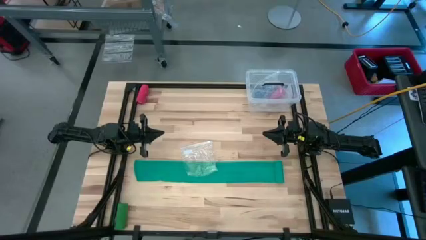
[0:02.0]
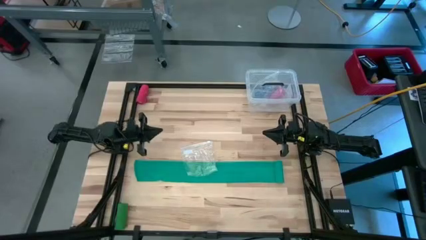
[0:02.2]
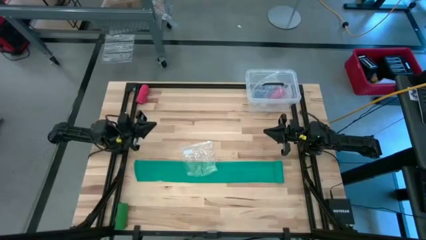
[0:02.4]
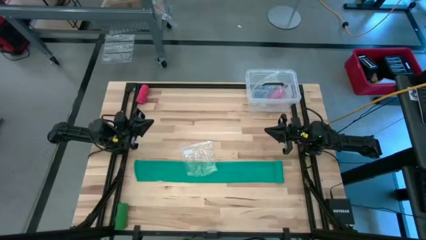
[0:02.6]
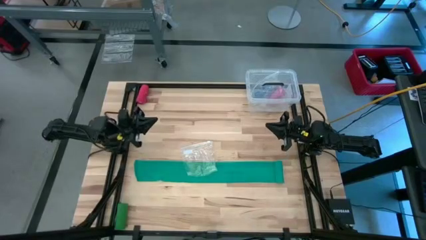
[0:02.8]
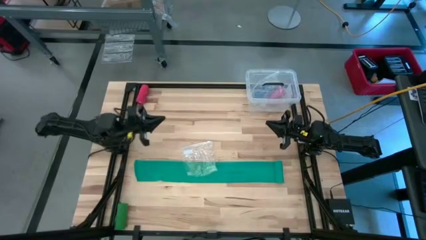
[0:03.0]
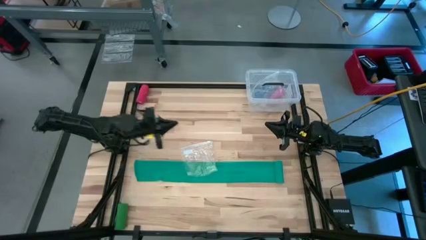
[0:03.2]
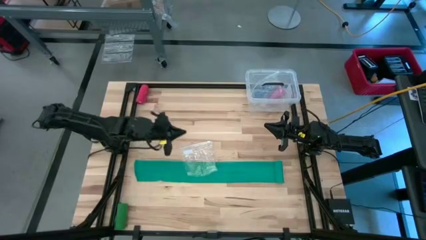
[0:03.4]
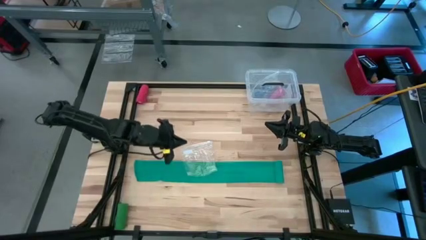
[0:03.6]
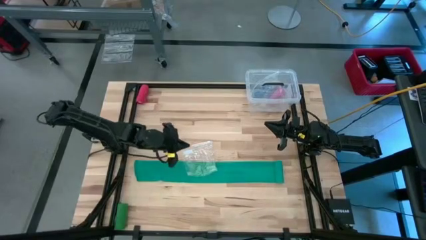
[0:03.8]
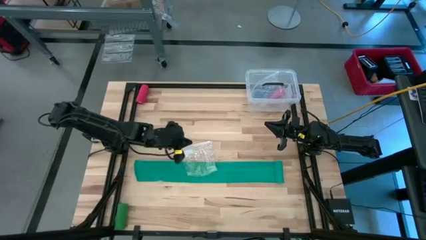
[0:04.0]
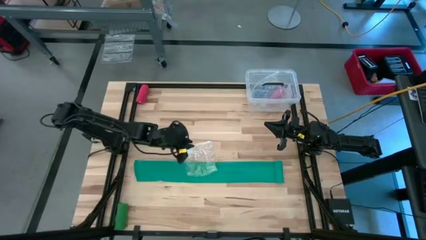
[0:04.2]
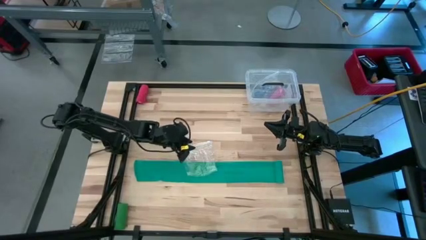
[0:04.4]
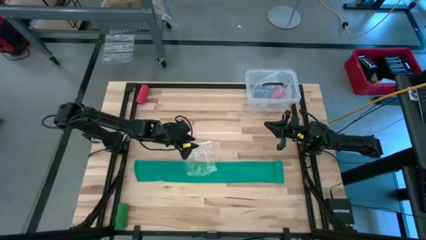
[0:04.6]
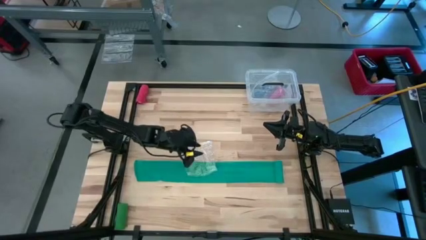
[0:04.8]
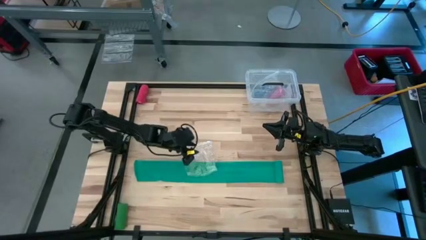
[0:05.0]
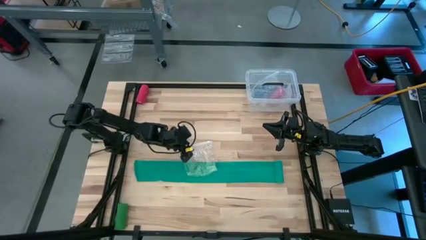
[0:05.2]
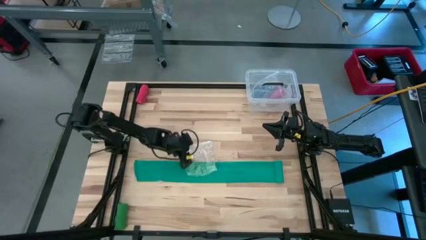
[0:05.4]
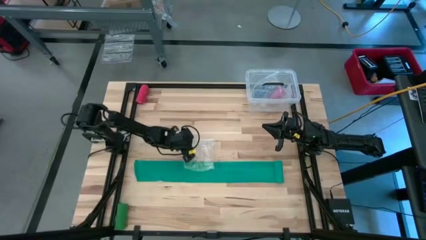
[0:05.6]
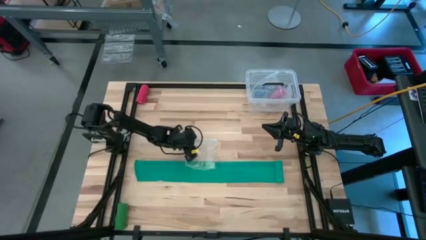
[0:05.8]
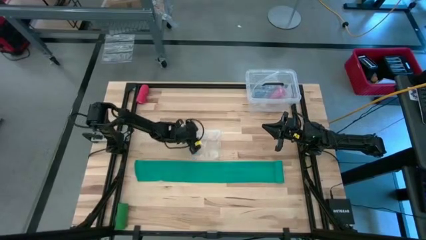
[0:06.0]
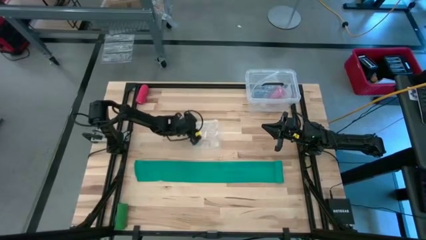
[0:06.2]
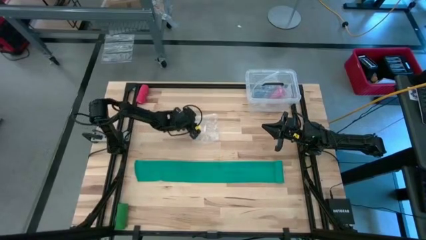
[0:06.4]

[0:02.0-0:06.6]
Task: Roll bandage
Move the transparent zip bag to the top center of the table

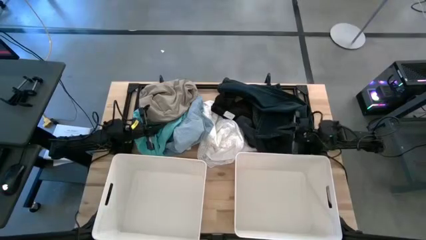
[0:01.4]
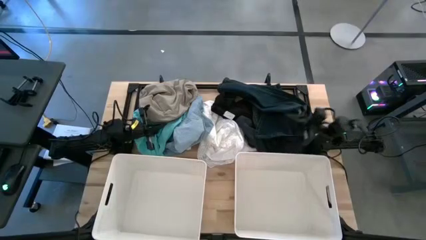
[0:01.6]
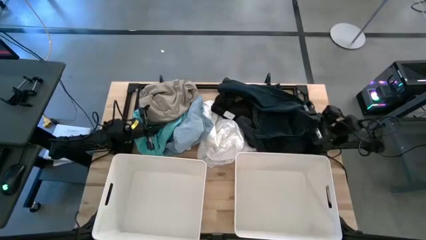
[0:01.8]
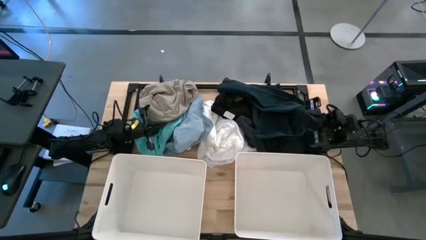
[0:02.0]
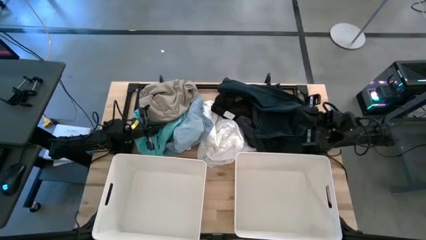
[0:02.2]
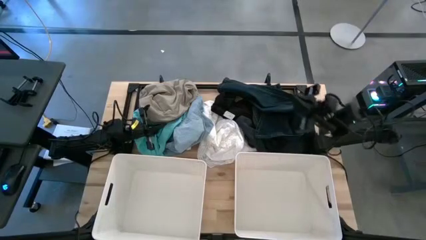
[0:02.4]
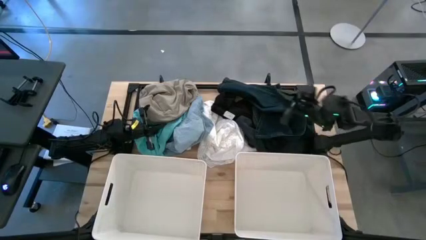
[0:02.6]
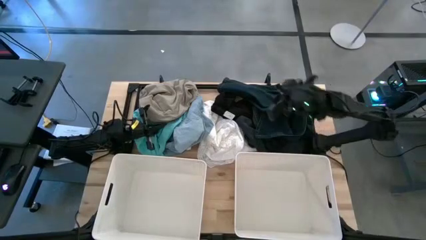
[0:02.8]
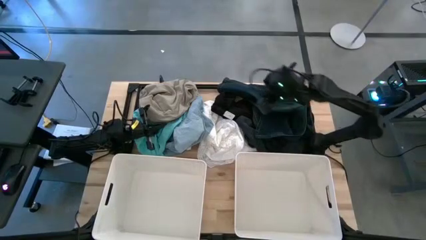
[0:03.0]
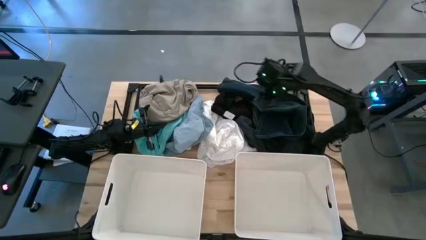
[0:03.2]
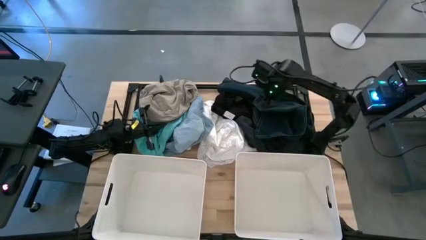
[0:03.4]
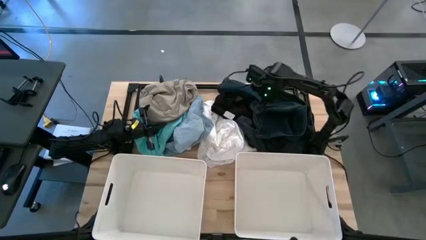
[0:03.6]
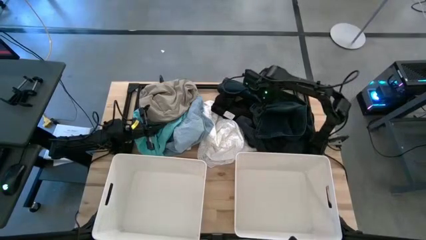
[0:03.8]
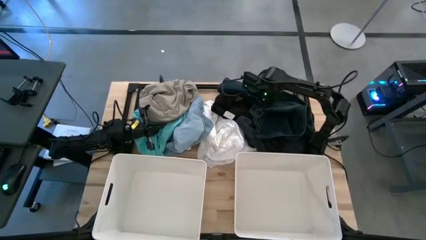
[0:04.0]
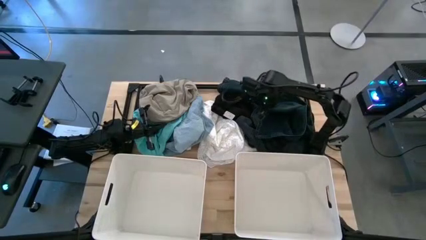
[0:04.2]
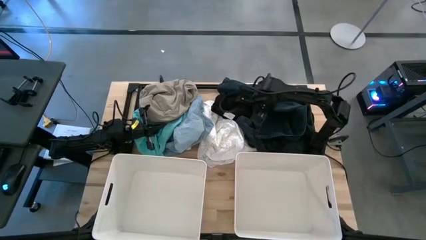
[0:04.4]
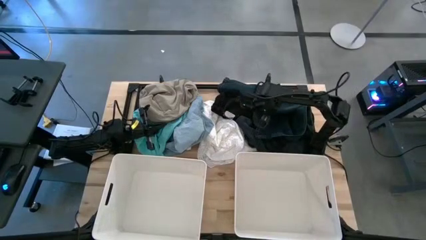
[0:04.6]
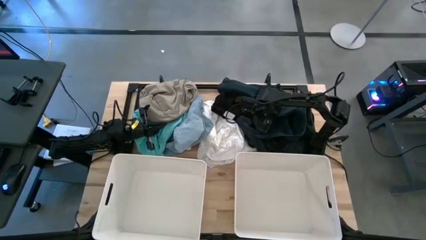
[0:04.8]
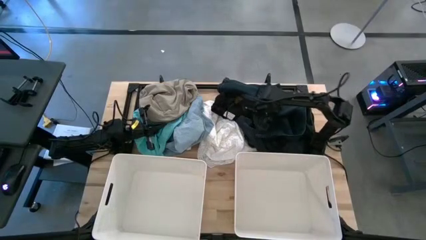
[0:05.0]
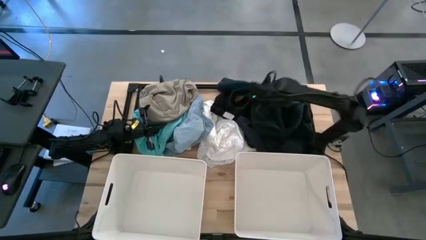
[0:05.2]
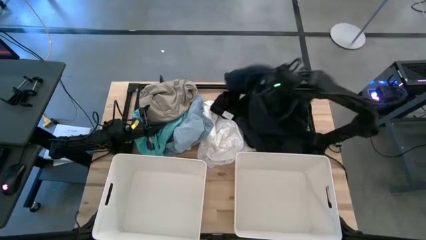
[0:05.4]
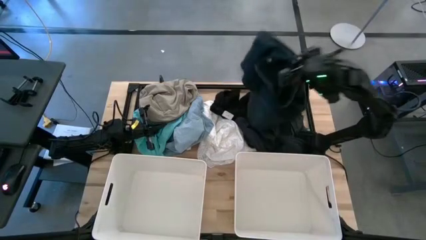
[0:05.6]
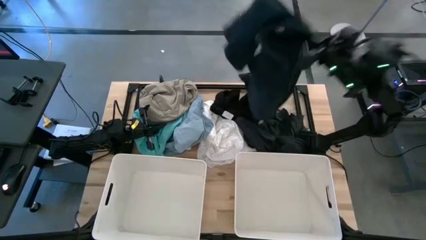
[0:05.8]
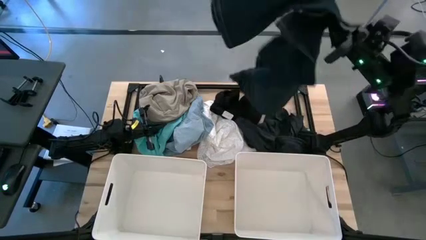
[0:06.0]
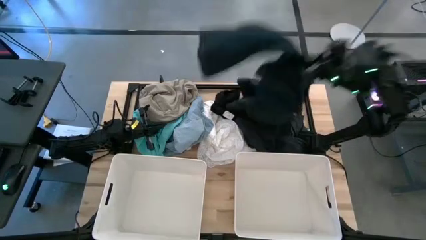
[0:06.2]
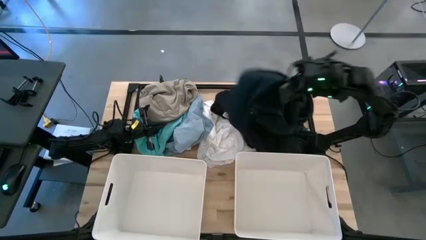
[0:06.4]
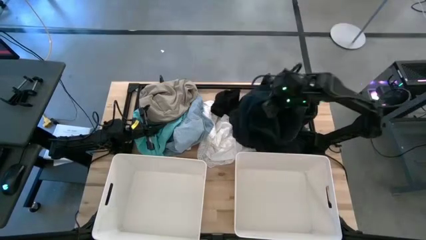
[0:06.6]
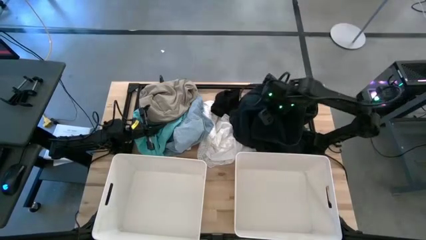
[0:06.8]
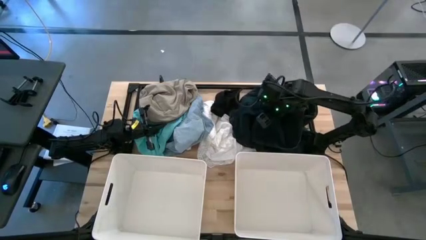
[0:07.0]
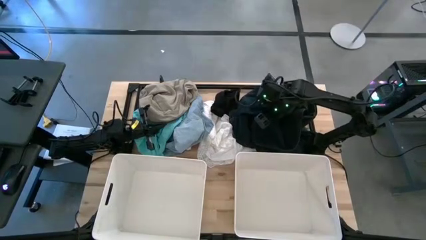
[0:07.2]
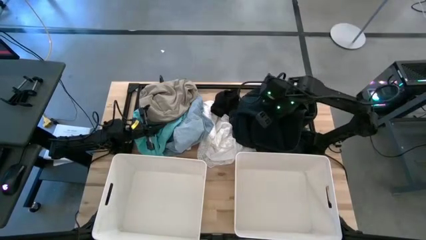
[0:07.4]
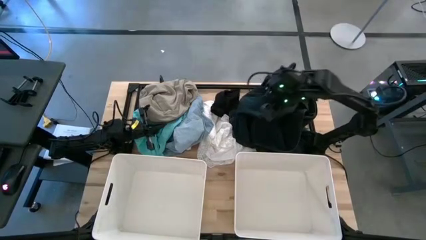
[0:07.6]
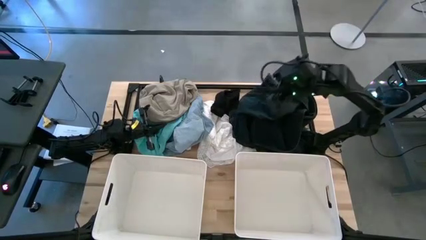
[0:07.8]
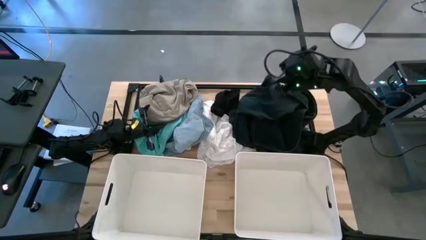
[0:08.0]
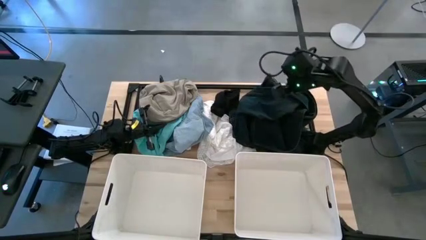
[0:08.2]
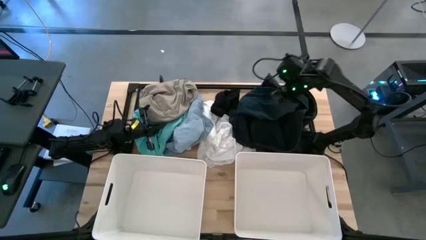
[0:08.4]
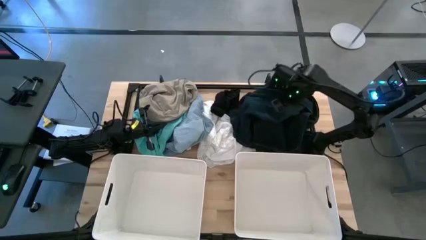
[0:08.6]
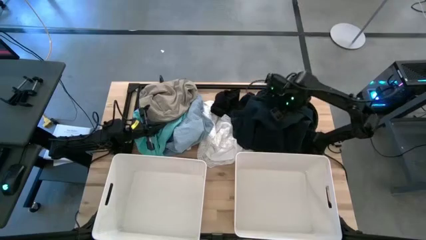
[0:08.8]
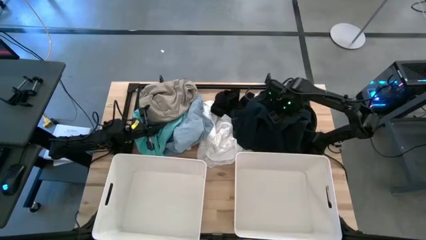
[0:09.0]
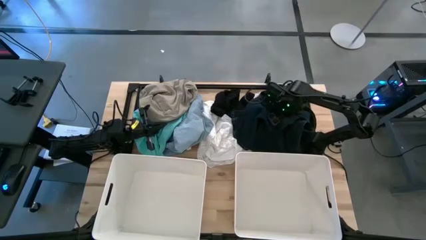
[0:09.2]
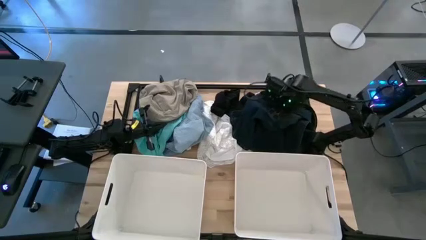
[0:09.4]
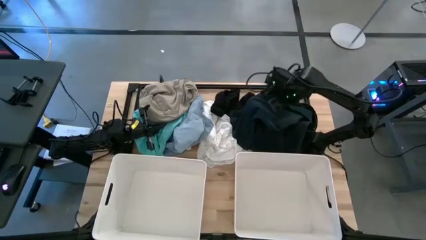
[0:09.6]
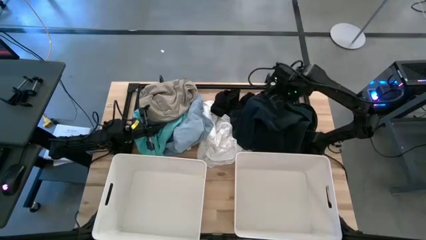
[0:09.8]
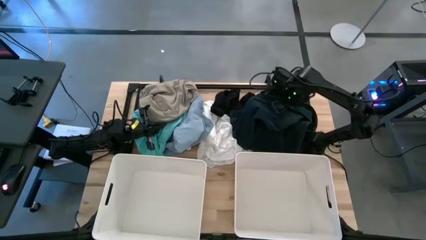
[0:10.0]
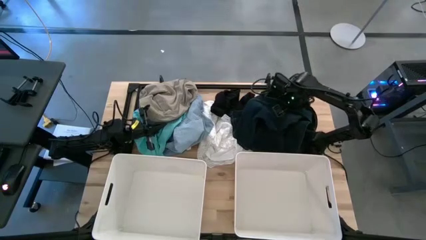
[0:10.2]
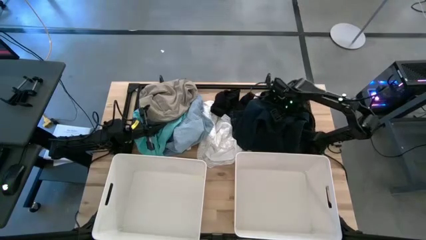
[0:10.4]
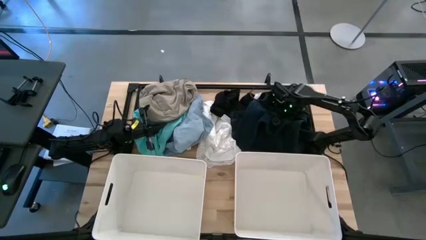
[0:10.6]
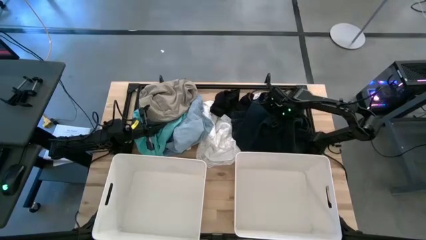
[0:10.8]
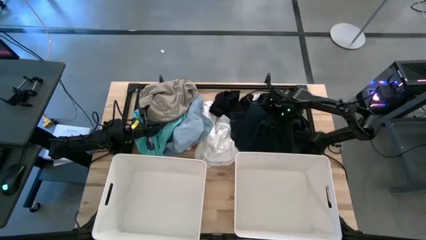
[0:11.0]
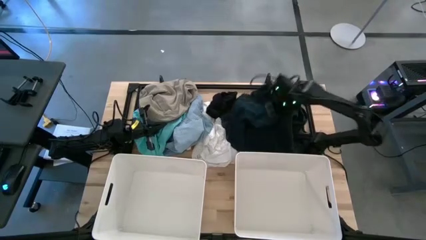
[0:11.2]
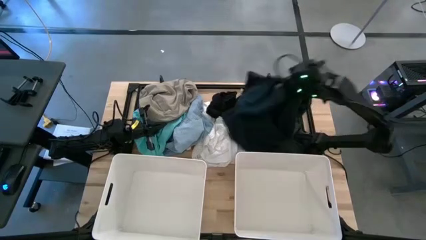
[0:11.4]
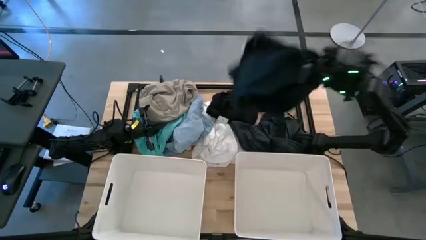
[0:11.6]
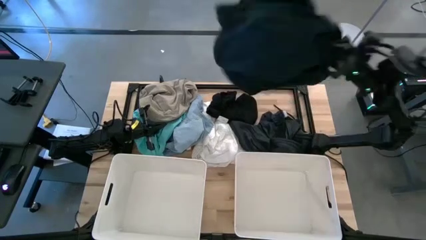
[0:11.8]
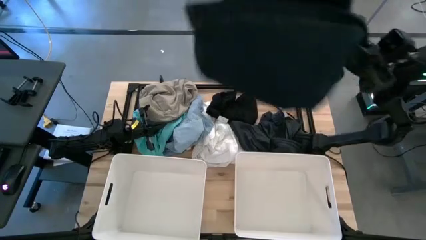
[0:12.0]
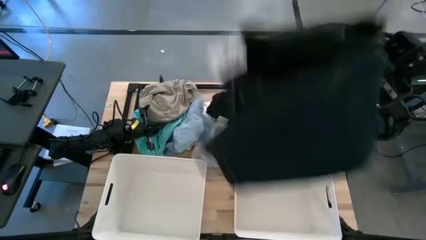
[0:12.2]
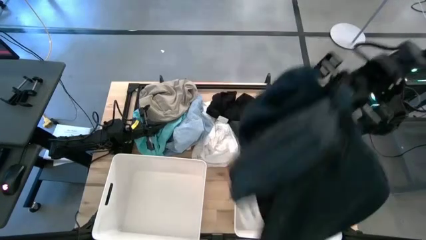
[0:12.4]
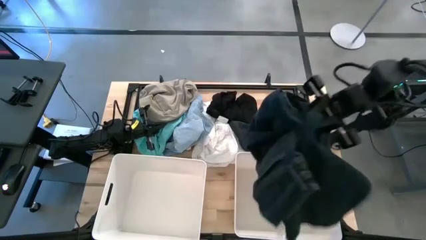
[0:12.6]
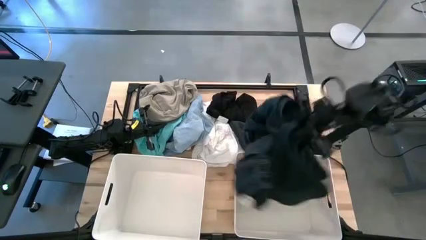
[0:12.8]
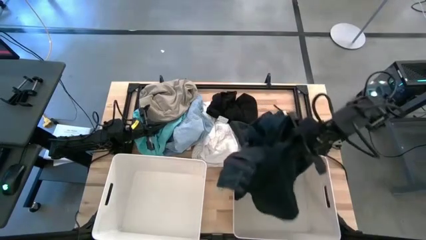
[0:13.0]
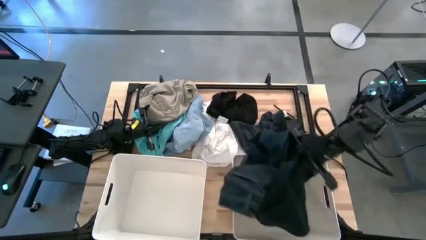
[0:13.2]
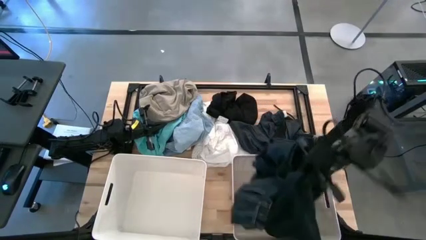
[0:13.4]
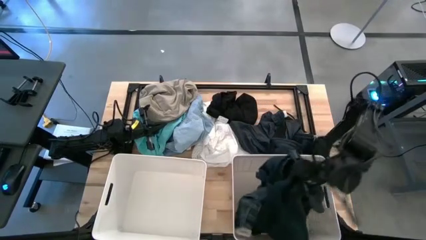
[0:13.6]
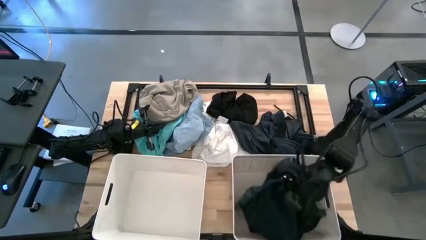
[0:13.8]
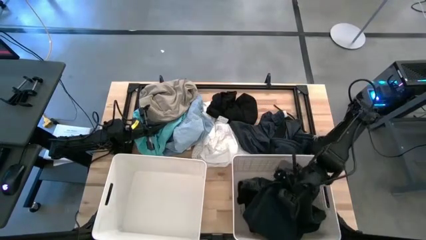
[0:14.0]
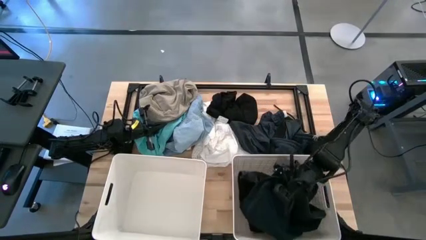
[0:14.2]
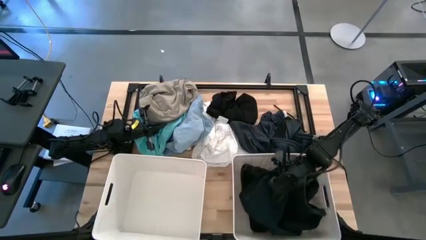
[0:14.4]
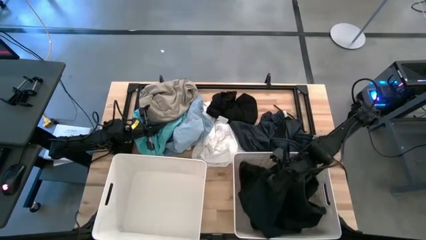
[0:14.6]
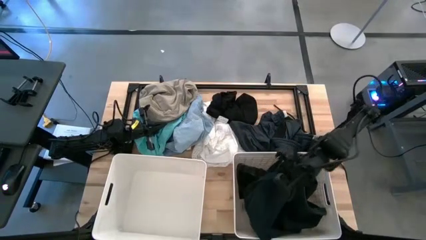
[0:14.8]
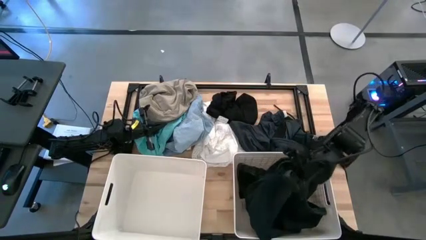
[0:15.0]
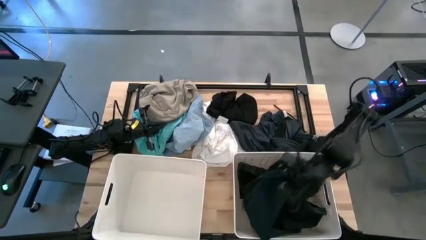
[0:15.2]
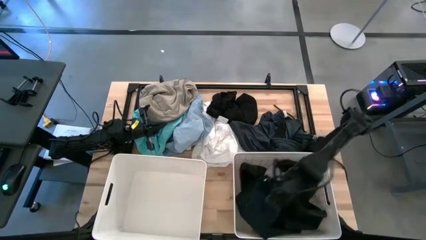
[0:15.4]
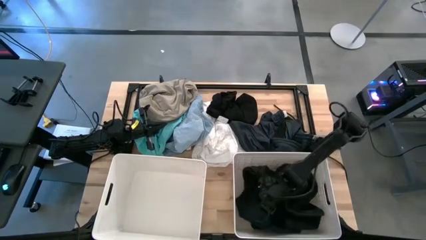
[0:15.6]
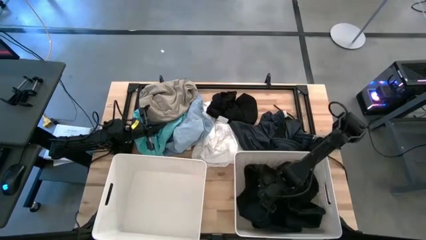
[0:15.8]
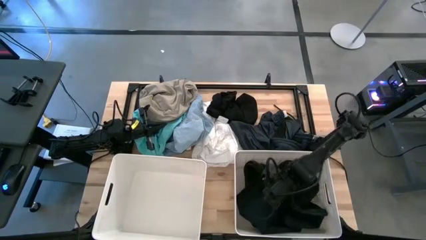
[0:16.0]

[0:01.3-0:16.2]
Task: Sort clothes
Put the dark blue pants into the right white laundry bin
